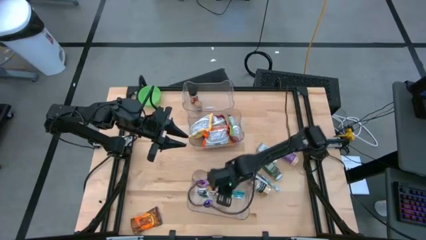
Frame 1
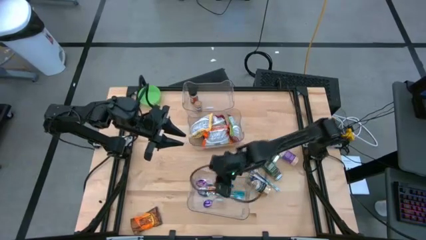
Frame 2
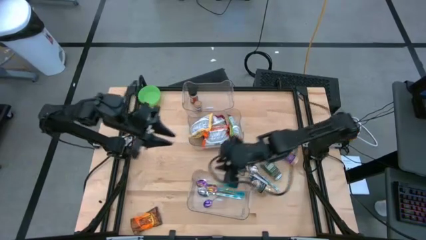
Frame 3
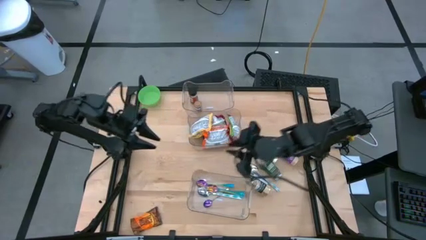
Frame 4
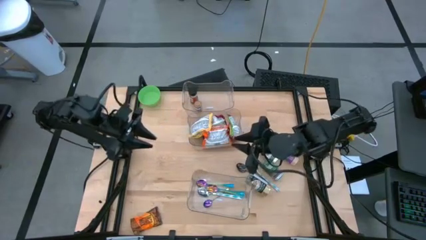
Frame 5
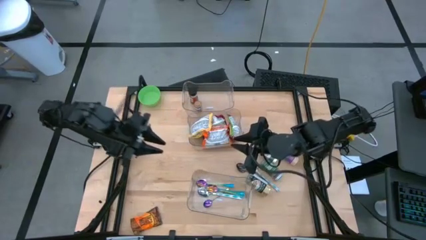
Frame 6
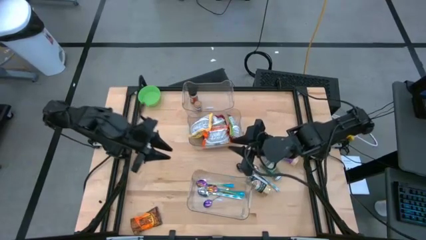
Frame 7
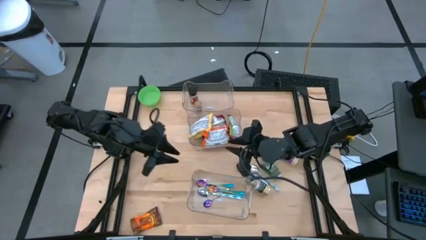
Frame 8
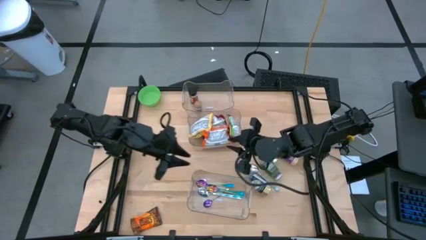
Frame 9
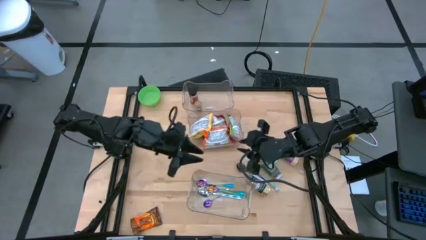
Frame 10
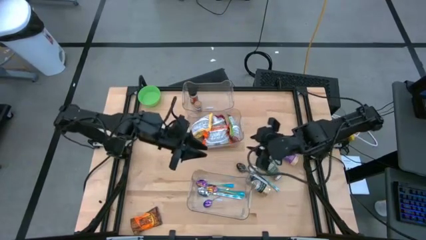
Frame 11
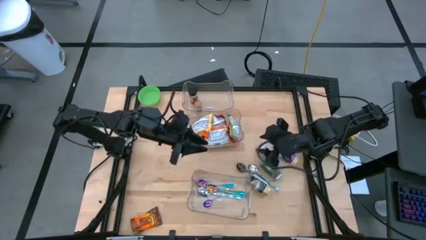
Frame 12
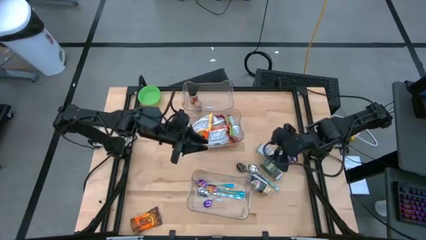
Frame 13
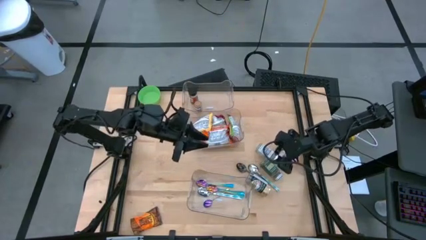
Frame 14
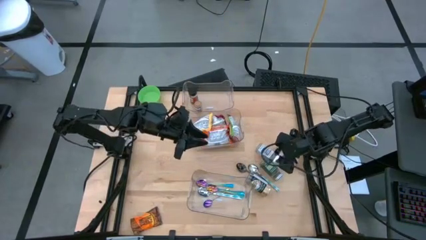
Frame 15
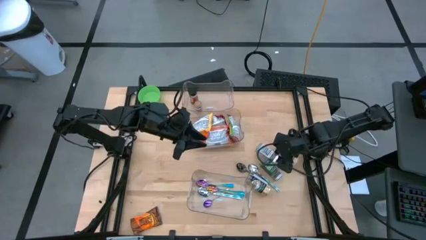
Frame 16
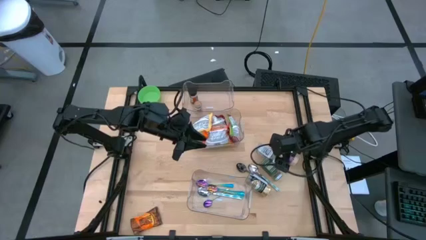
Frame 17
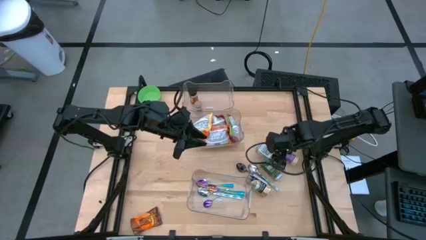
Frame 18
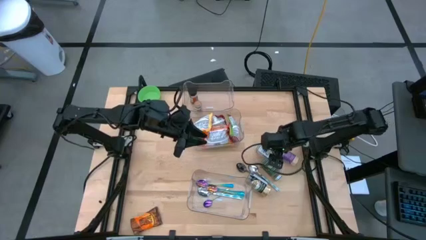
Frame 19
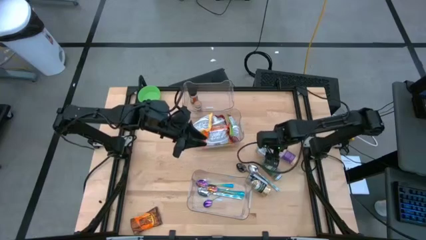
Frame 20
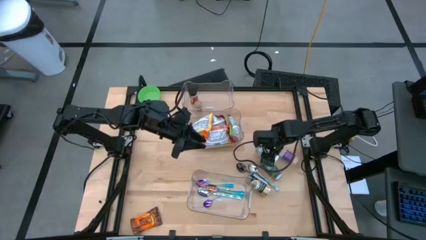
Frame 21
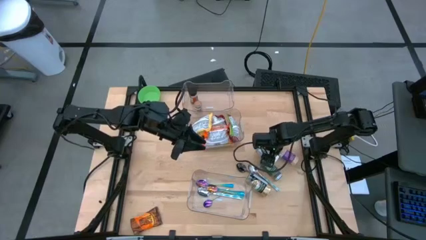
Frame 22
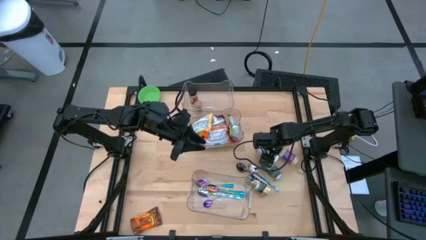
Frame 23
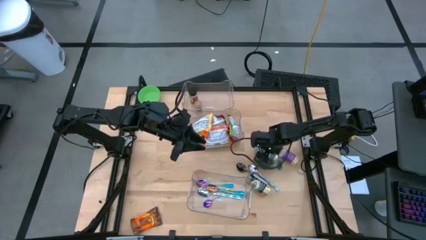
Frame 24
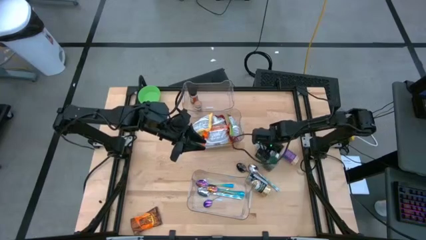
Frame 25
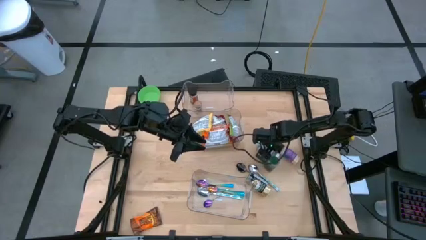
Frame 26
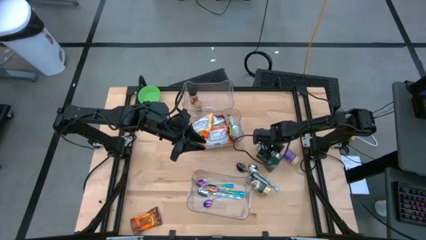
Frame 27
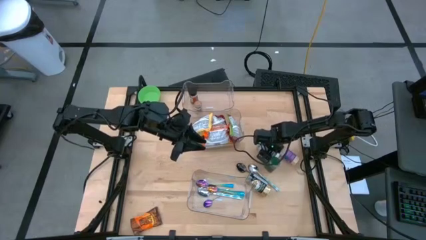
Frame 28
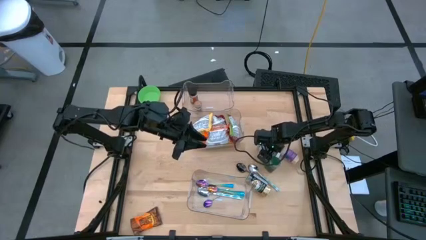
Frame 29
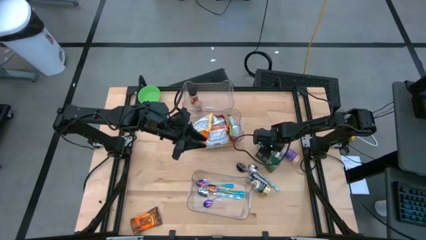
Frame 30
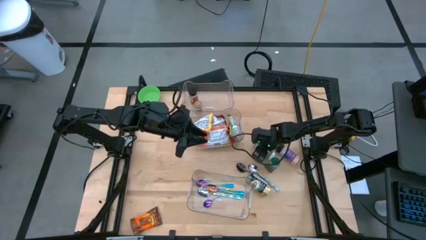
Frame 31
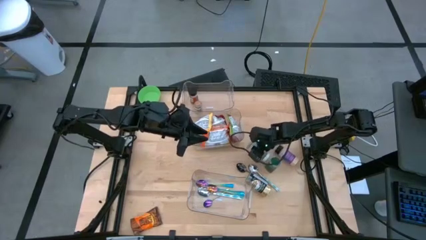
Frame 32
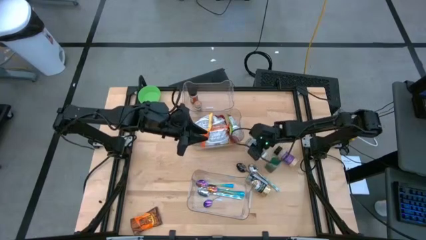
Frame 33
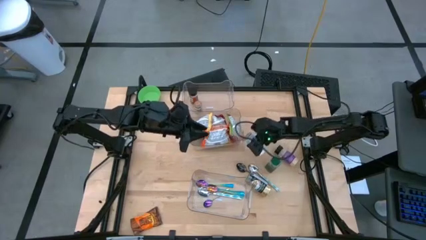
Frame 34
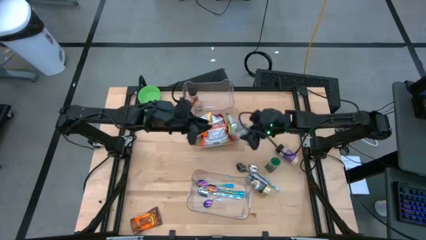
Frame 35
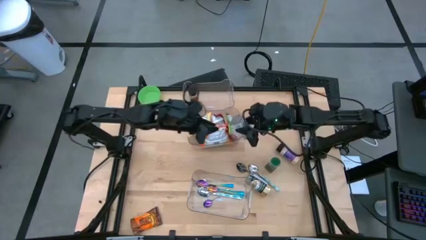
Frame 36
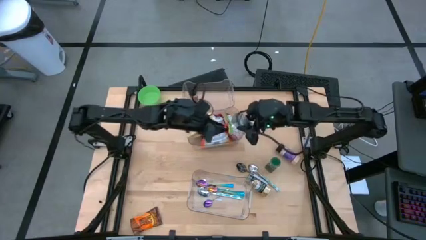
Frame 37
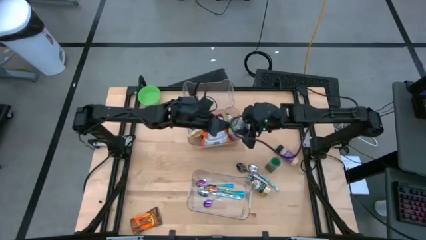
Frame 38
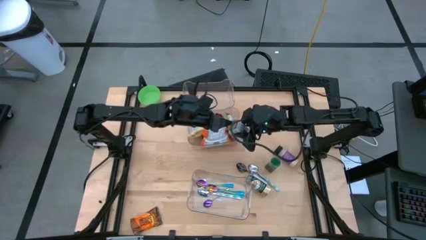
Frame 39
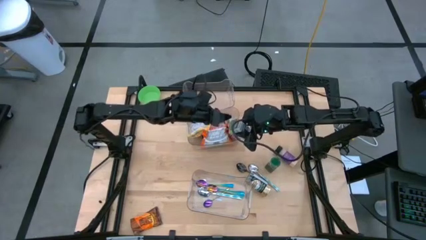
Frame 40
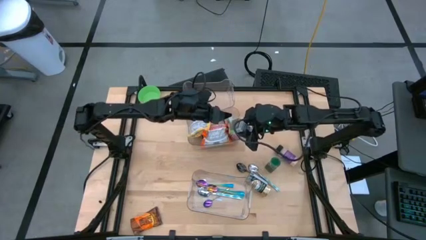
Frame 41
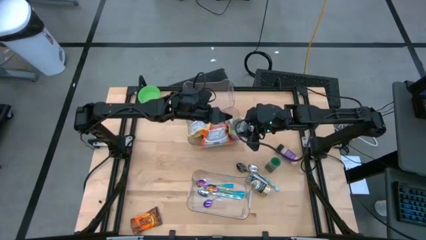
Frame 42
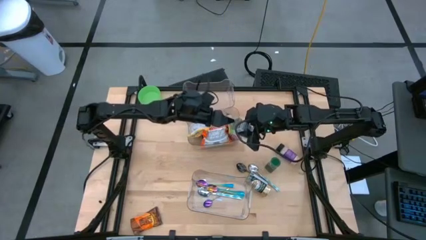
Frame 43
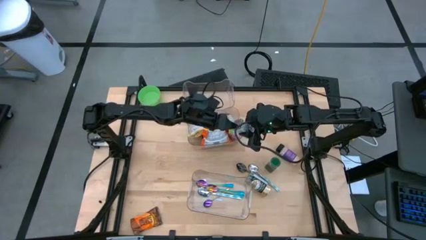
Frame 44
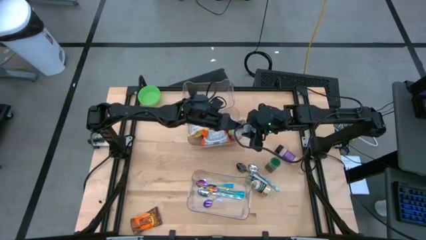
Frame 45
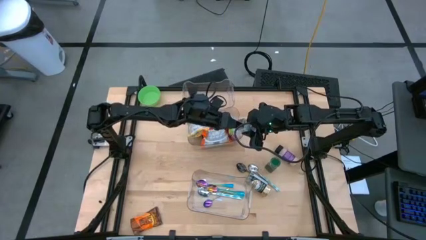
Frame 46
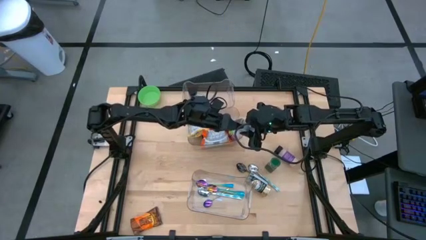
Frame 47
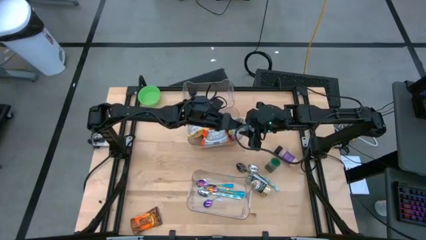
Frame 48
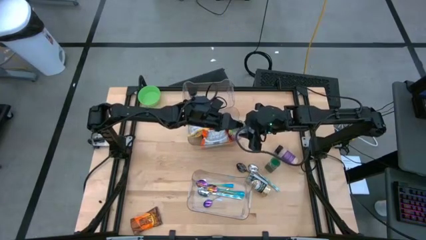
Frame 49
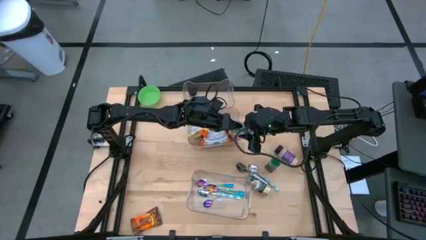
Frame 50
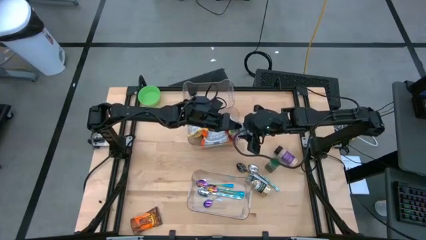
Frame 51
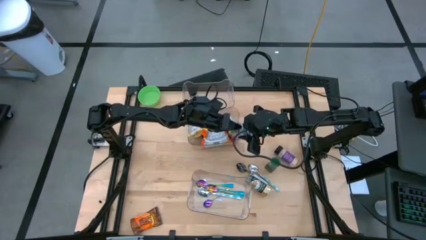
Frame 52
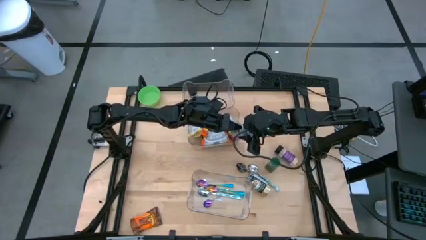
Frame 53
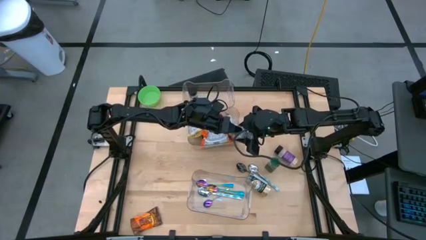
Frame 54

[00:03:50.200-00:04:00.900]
Task: Pick & Place Food Item
Put the white seasoning bottle into the top transparent bin
